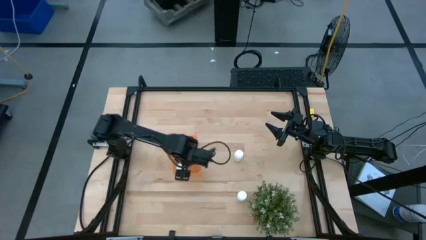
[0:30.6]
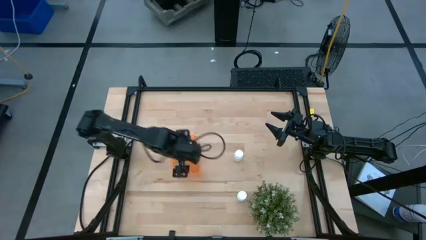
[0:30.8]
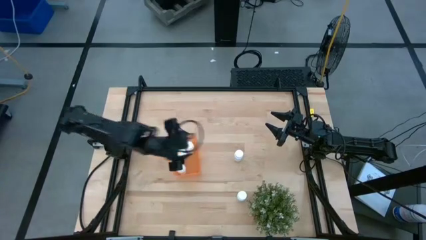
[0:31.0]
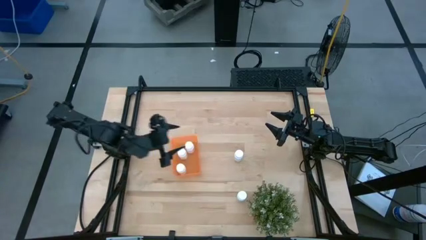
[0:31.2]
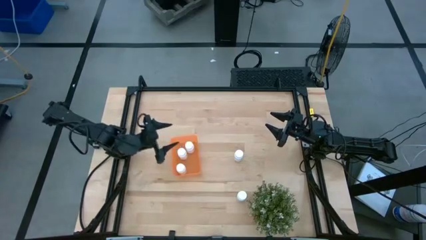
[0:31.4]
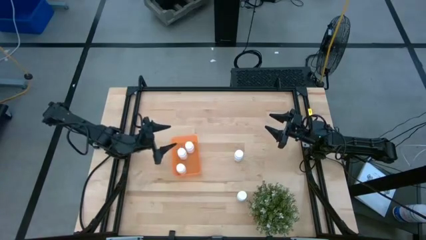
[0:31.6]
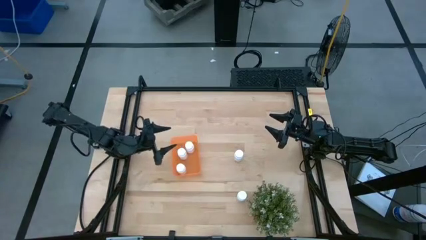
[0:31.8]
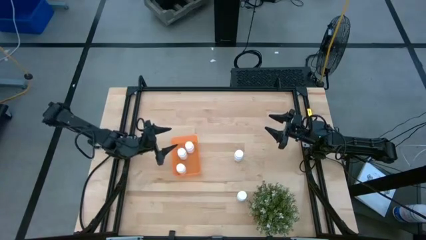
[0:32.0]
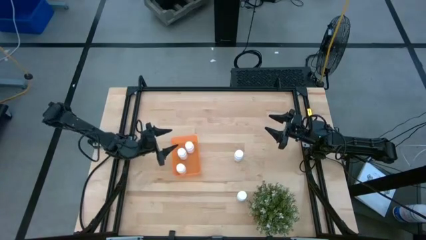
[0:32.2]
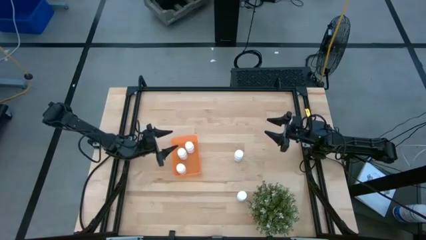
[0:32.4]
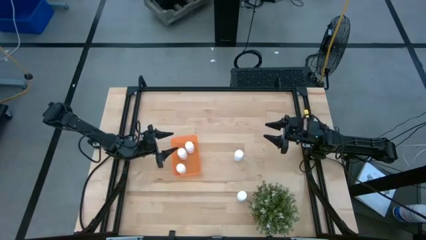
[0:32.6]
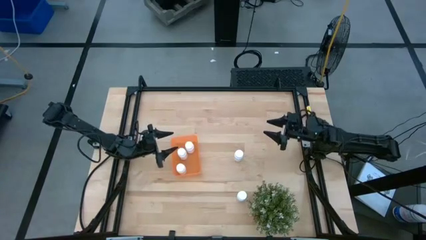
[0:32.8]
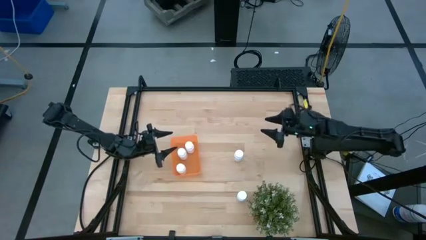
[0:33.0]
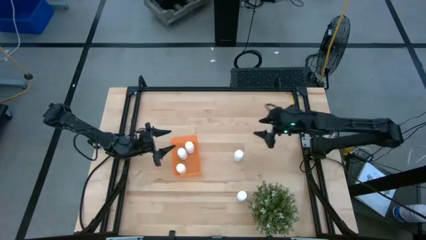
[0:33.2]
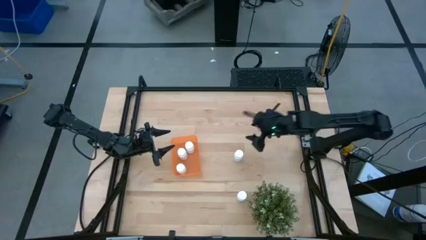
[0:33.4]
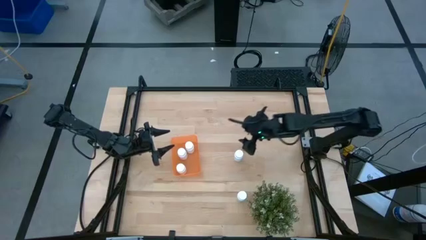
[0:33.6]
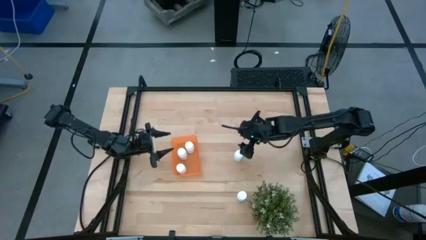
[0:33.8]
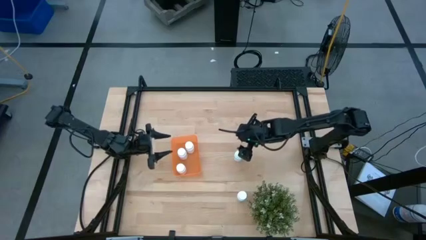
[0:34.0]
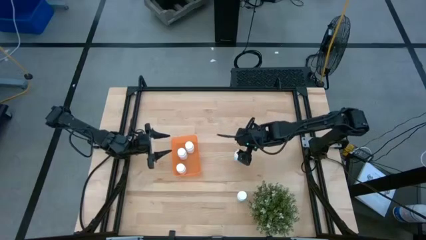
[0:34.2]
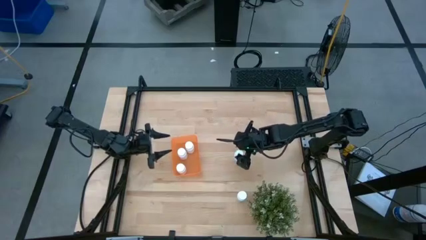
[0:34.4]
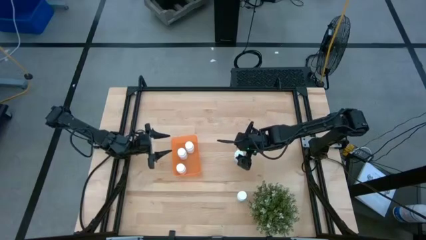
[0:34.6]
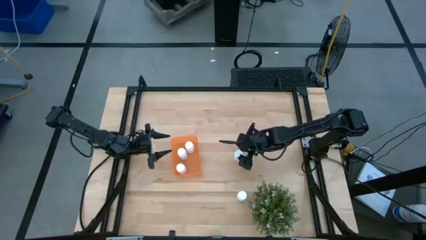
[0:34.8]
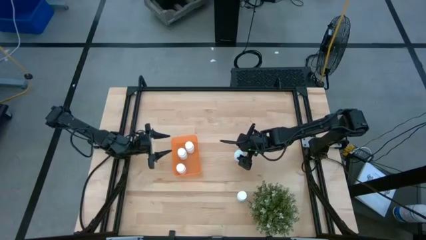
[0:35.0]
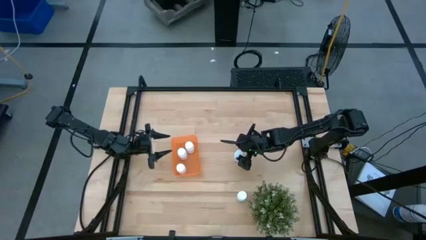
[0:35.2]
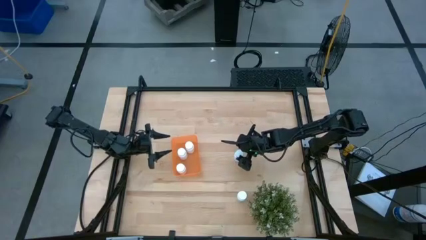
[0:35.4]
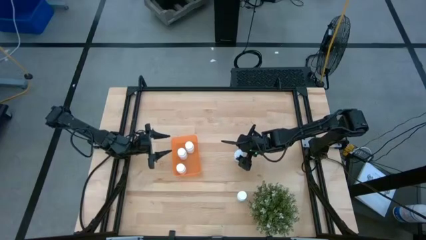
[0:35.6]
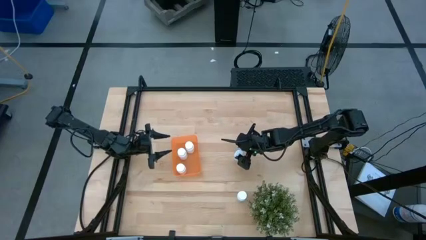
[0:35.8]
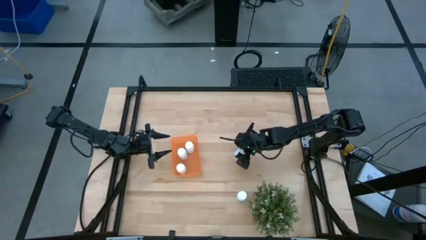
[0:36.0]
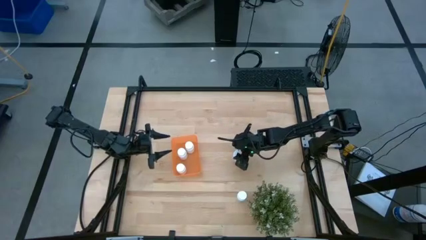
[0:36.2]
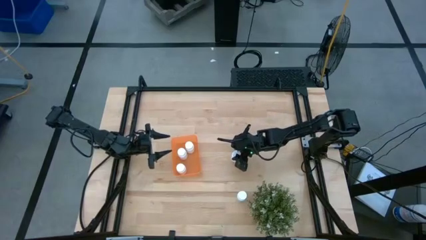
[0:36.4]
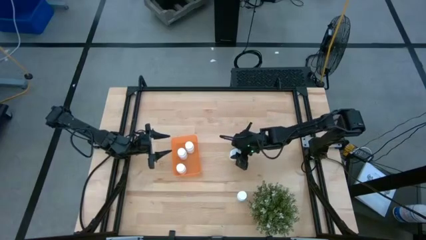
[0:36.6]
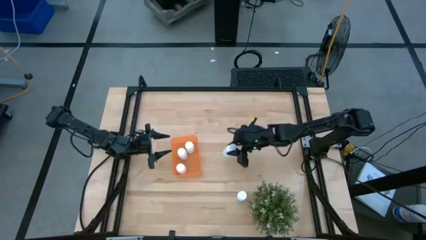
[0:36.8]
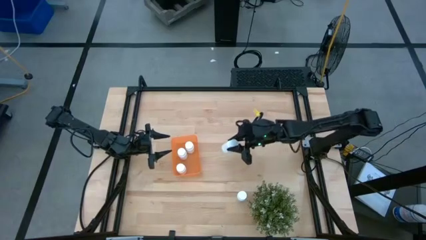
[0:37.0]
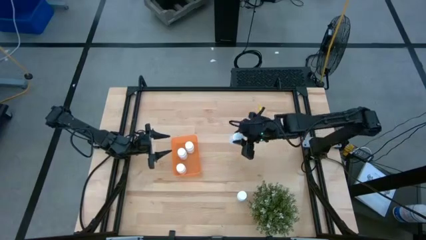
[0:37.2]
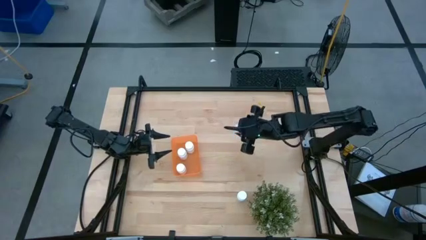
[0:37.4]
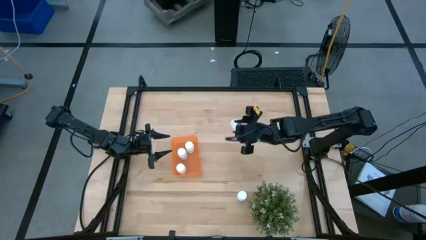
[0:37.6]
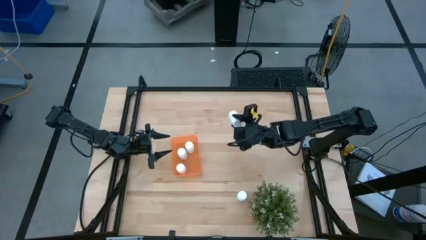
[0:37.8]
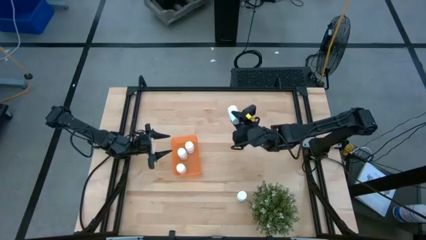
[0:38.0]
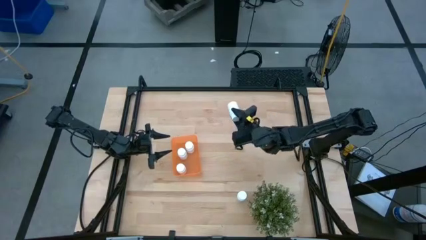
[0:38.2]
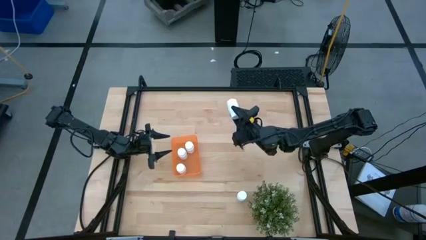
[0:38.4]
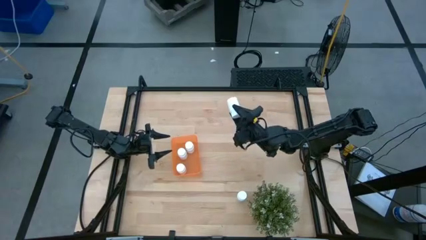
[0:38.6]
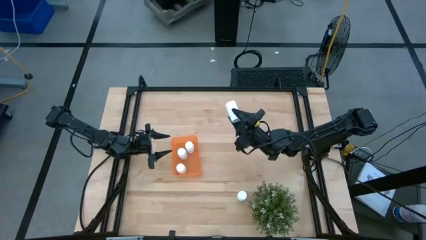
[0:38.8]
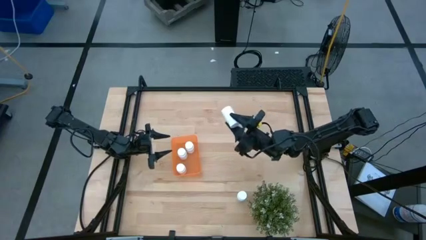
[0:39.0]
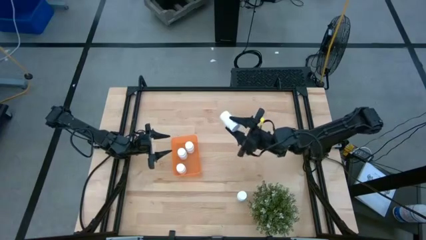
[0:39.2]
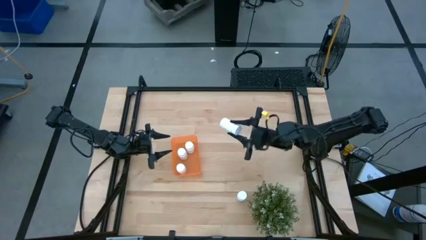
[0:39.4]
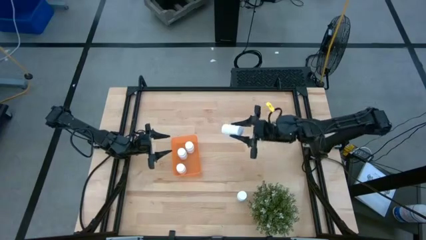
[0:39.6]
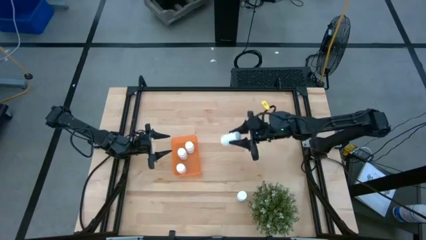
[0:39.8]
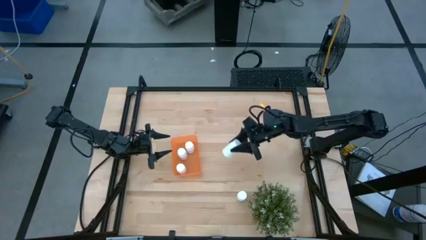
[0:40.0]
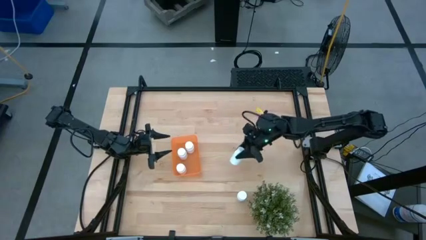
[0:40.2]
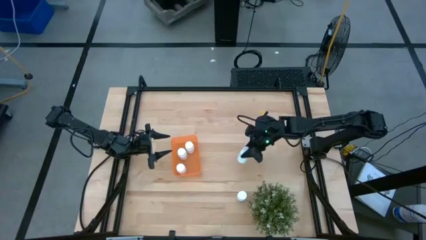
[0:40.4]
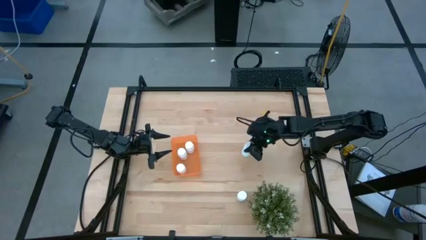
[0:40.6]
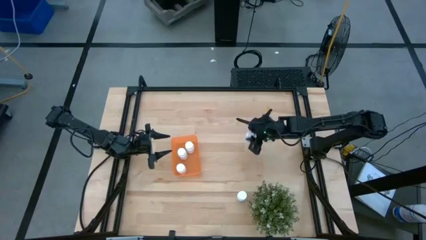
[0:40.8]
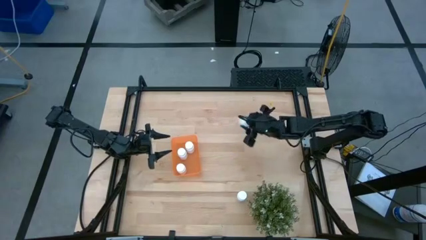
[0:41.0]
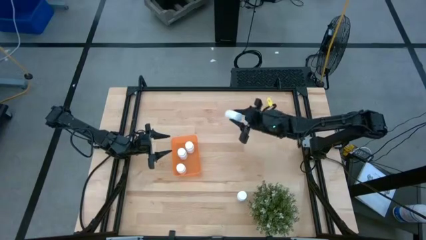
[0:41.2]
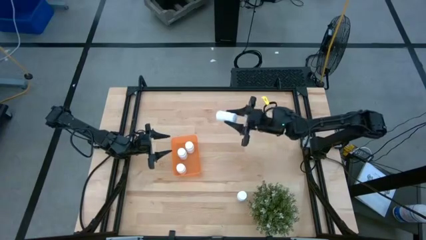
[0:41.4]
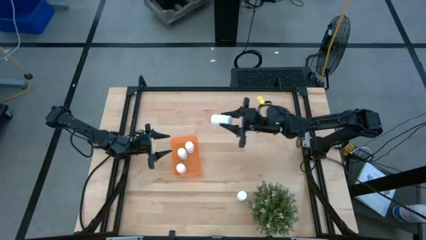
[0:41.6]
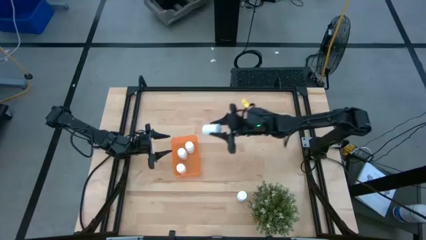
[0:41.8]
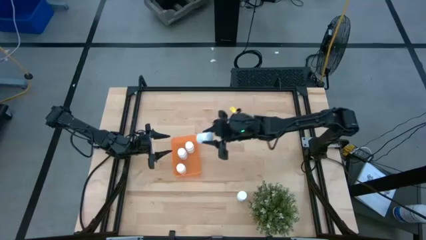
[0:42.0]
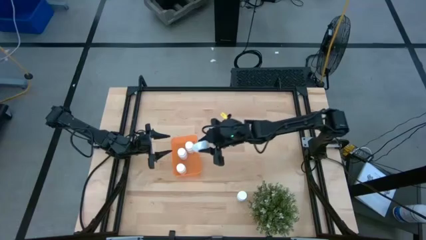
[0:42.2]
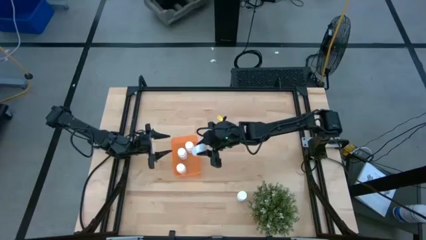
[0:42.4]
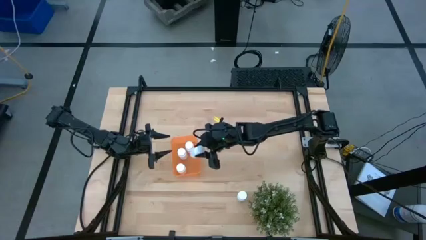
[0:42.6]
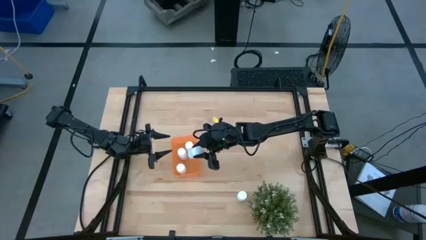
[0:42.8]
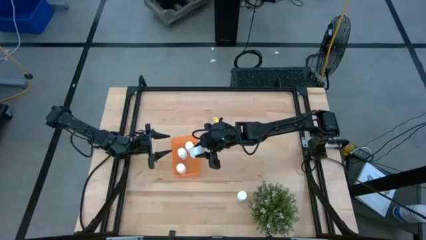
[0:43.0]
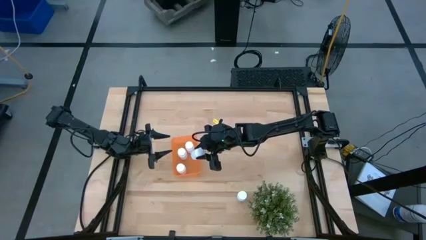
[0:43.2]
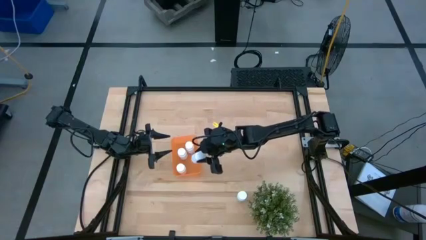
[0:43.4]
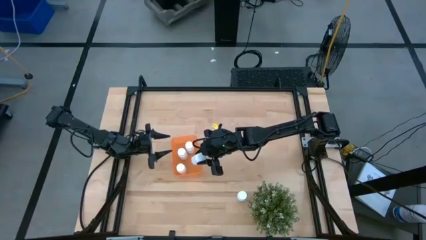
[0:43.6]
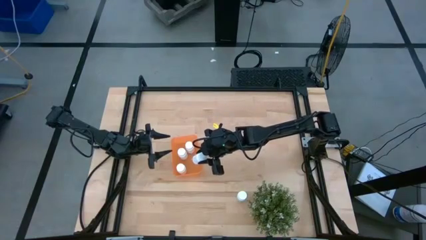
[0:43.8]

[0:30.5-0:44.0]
Task: Pick and place pill bottles into a basket
Put the white medicine bottle into the orange bin
